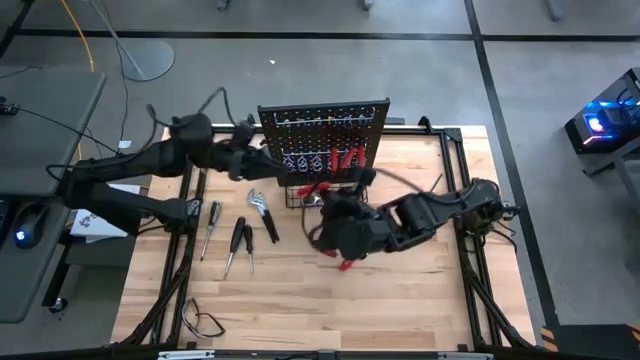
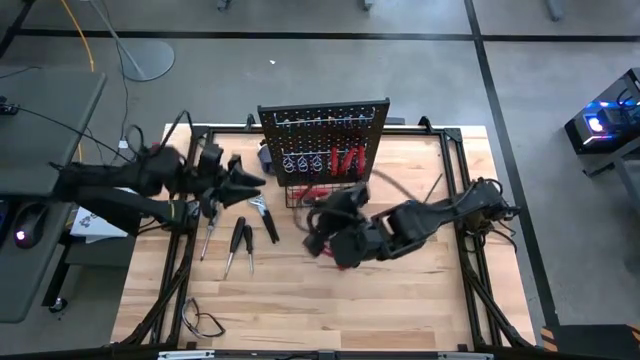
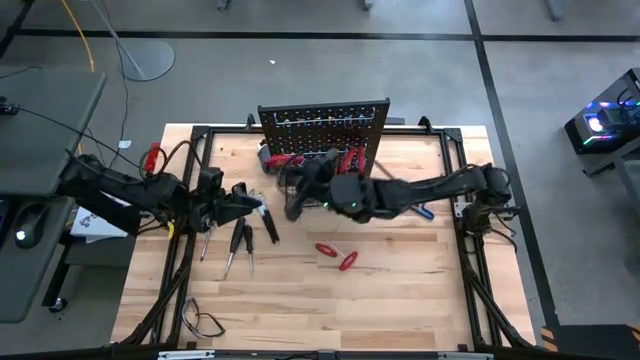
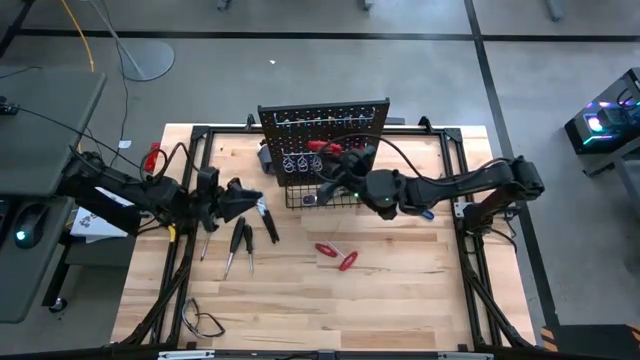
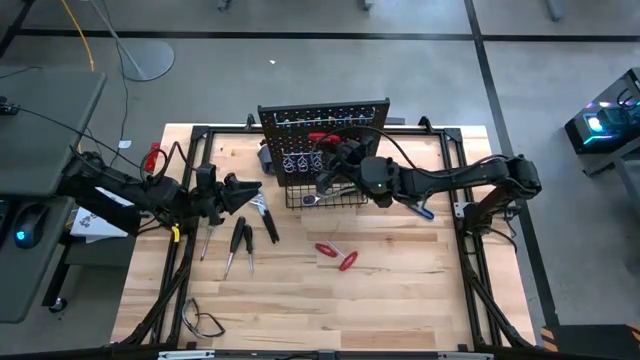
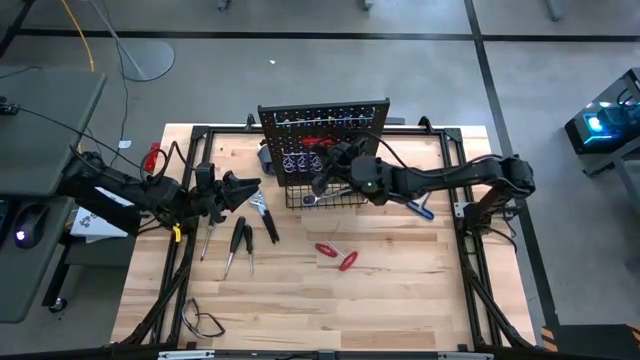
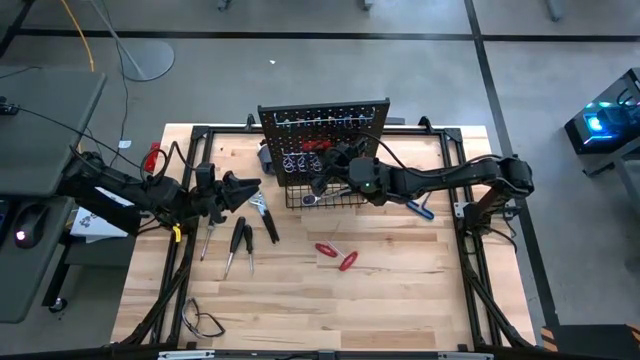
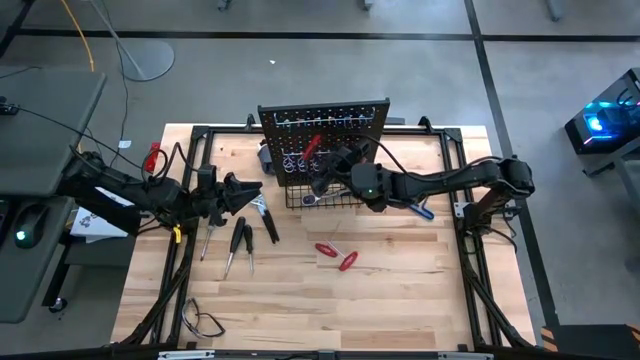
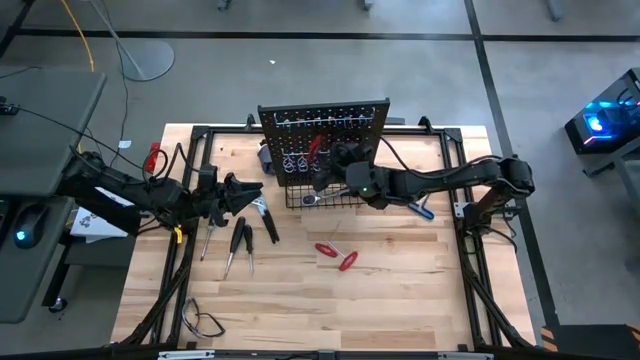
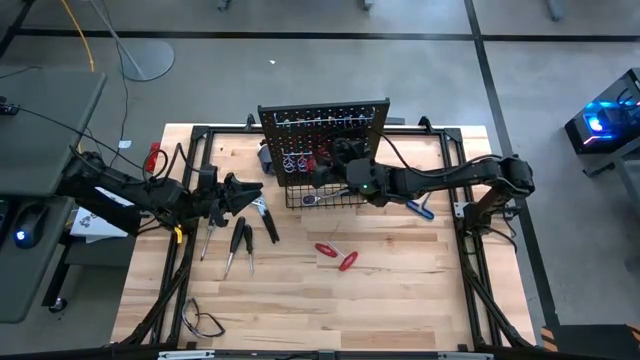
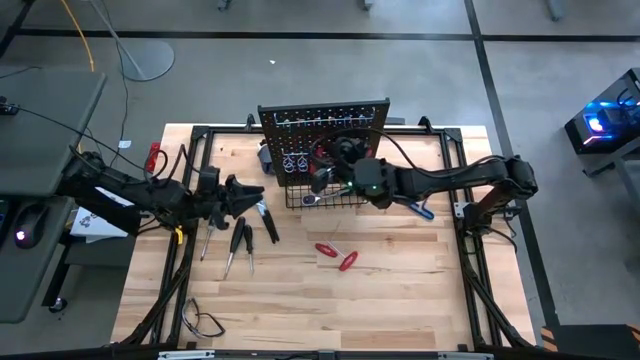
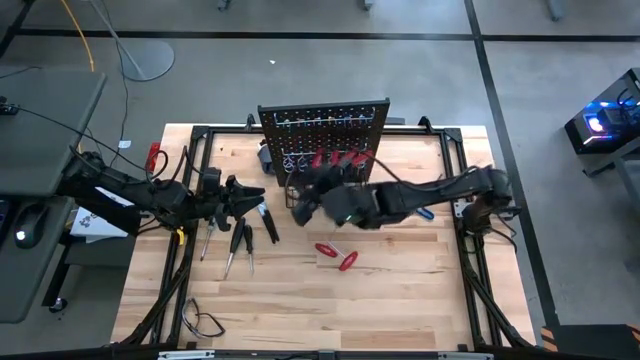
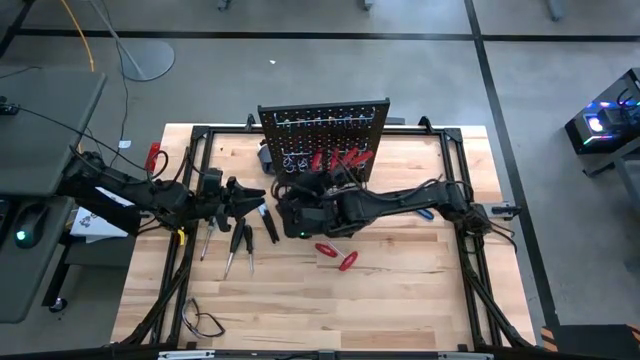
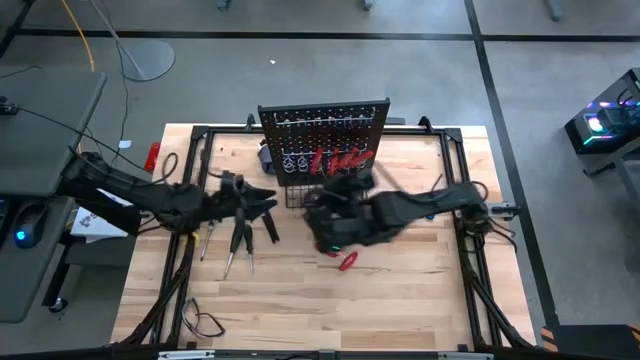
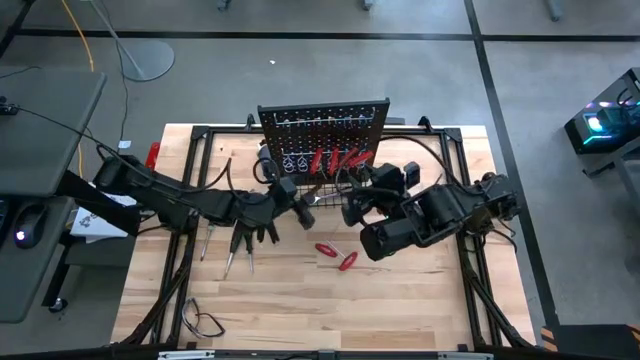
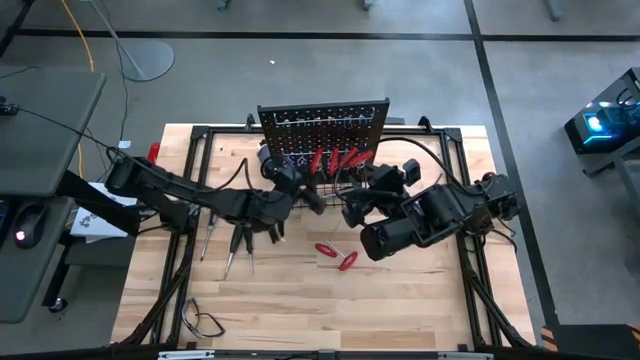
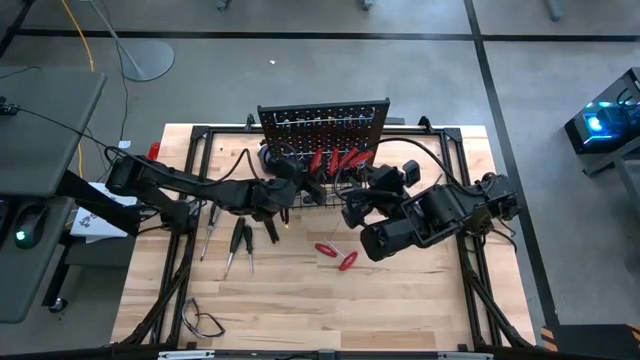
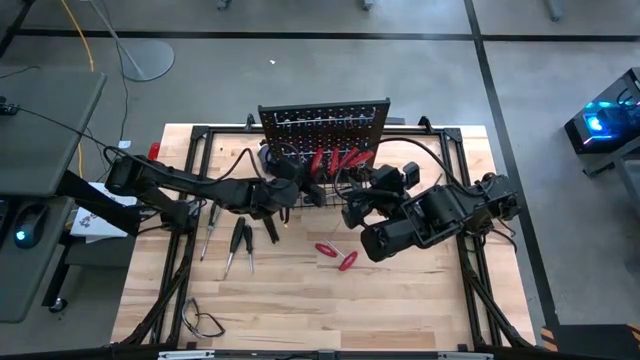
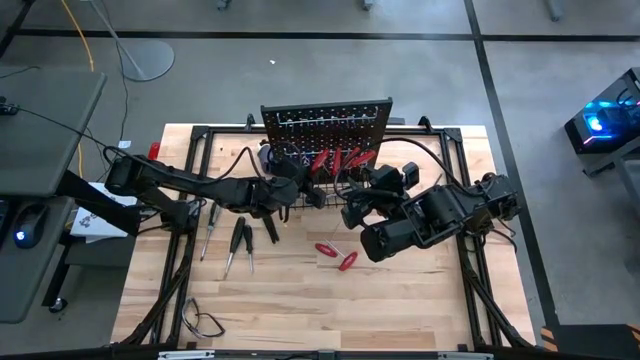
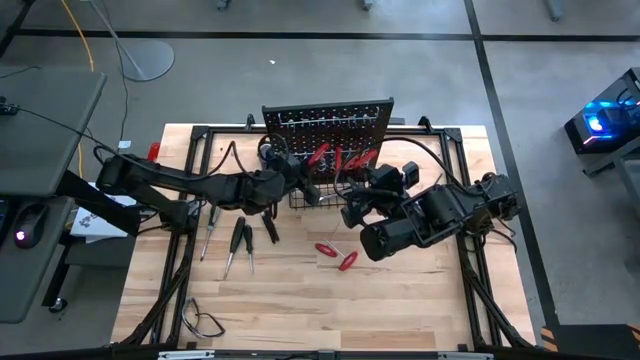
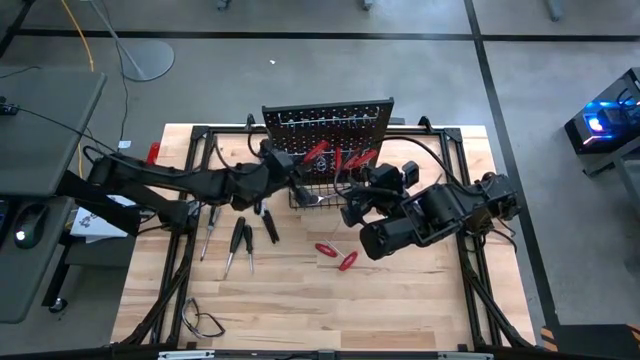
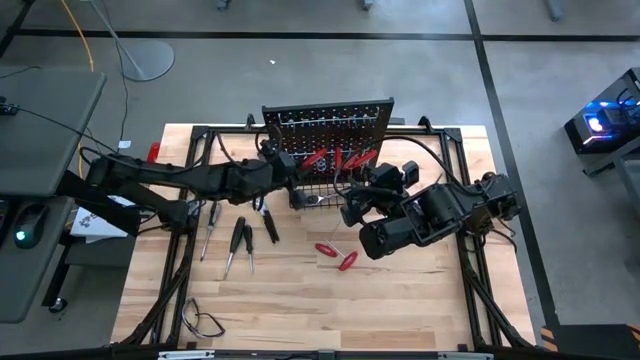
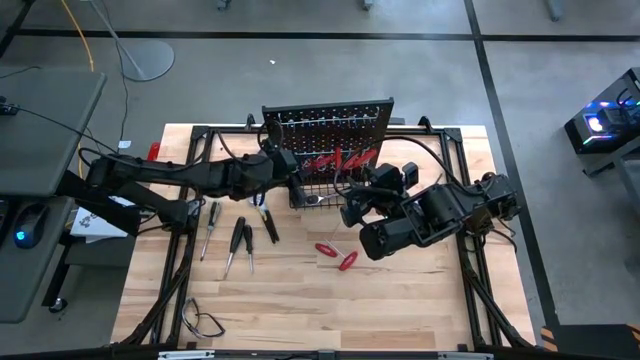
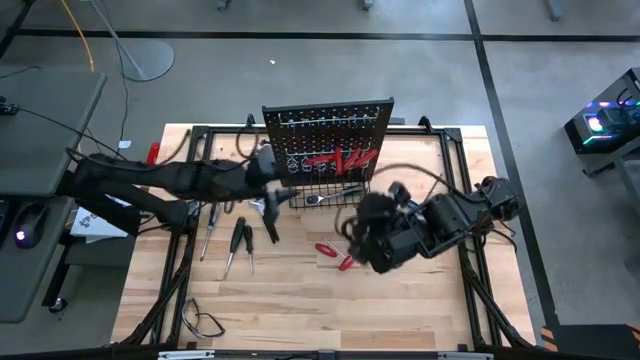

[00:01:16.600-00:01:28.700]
Task: Hang tools onto peg board
Hang the red allen wrench on the peg board

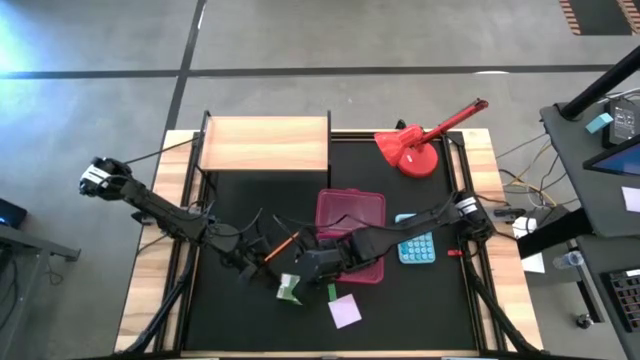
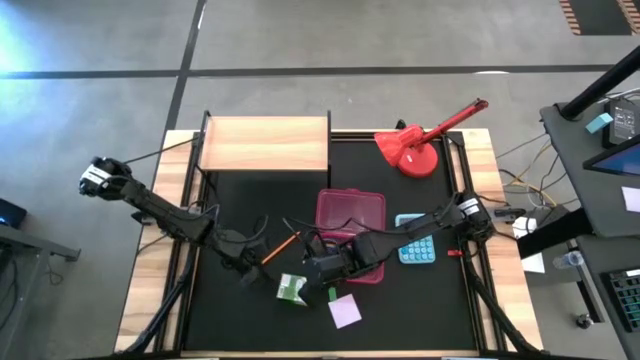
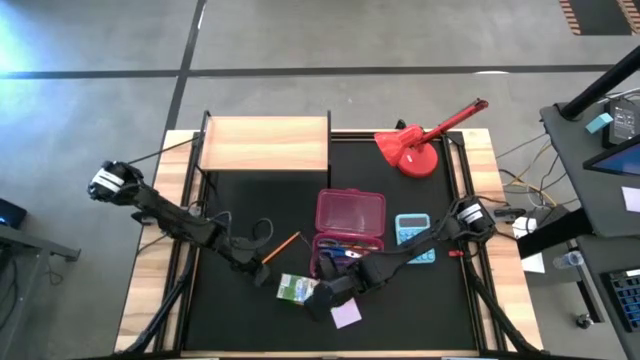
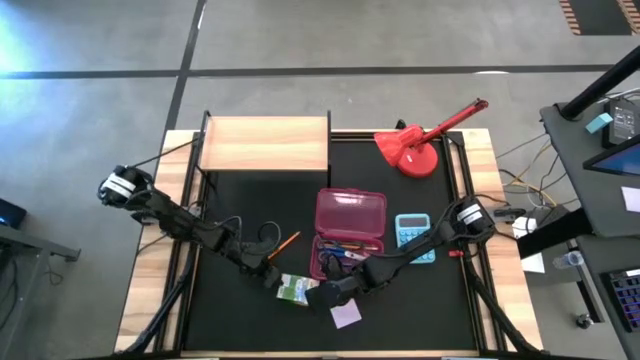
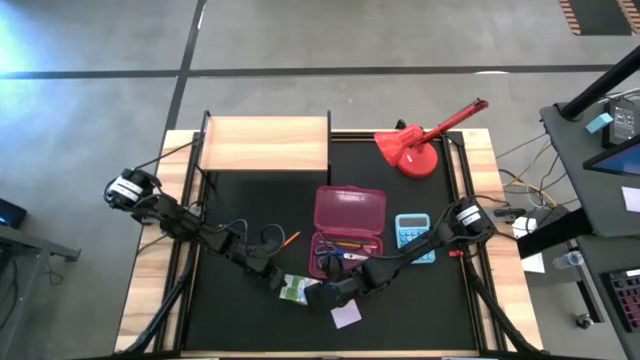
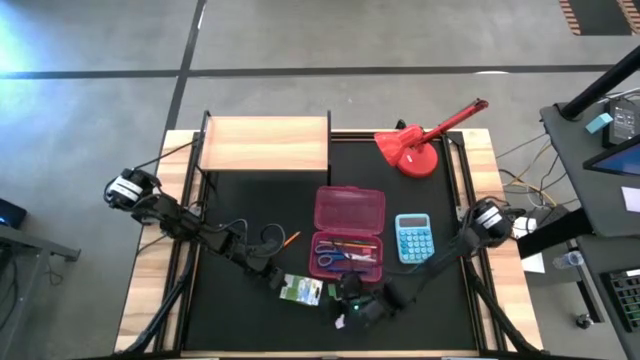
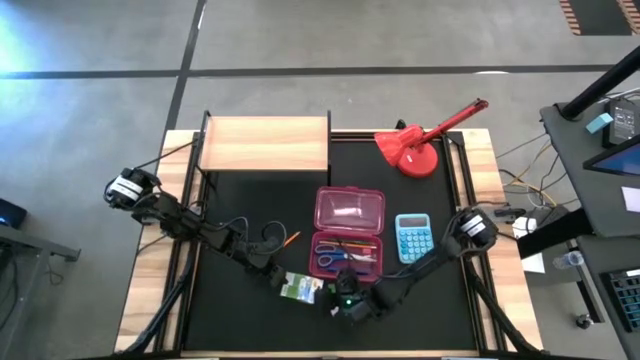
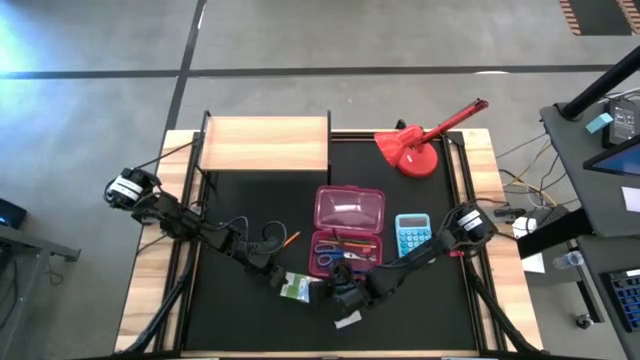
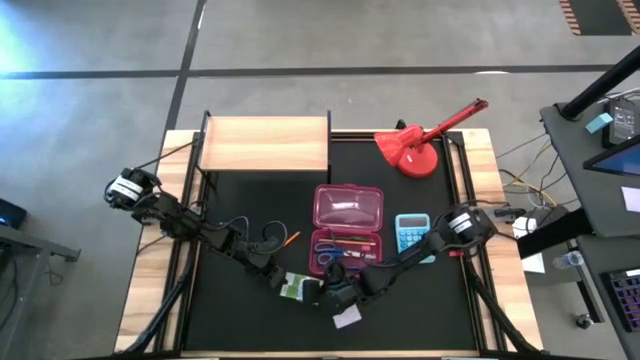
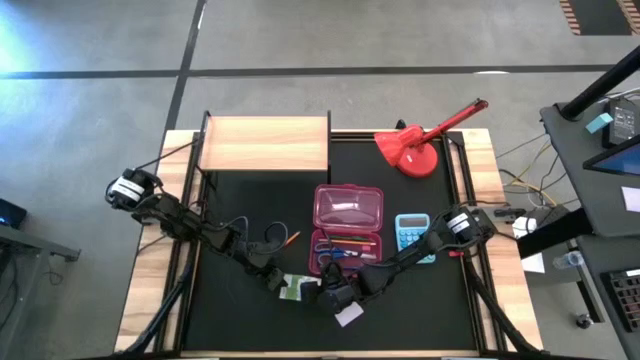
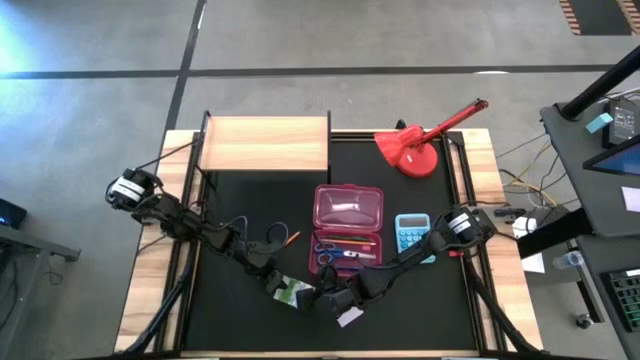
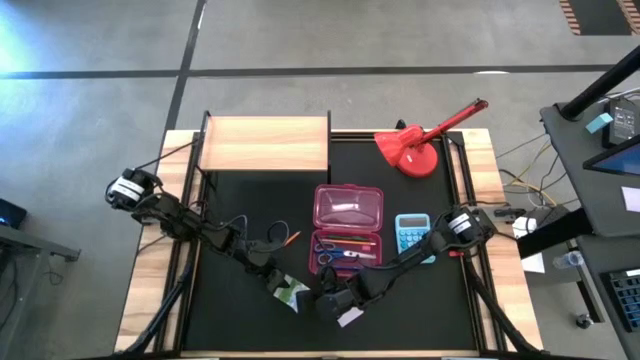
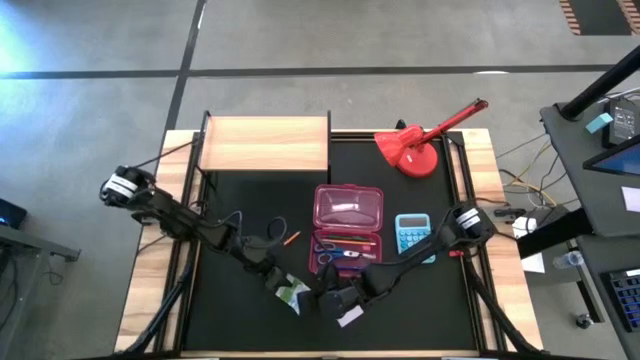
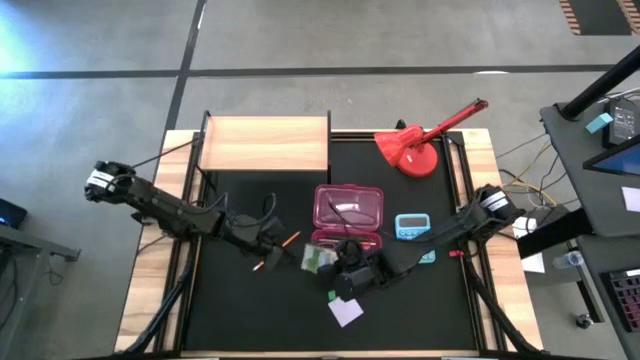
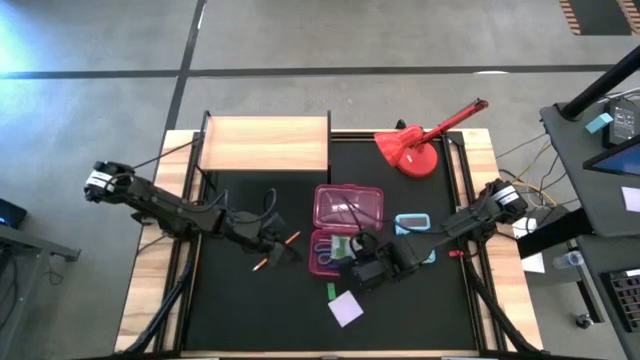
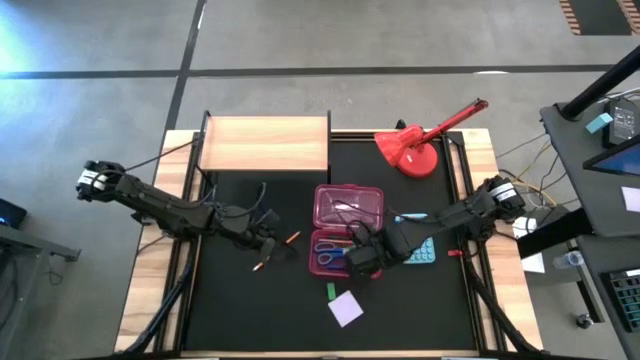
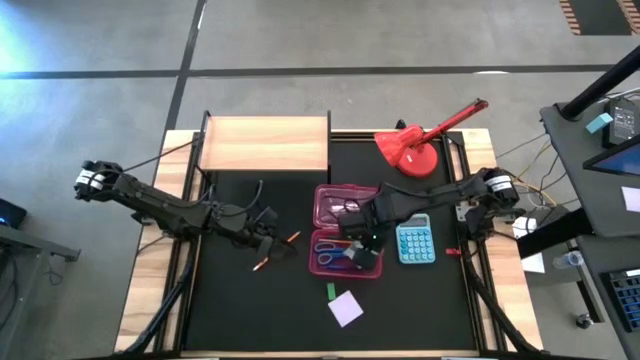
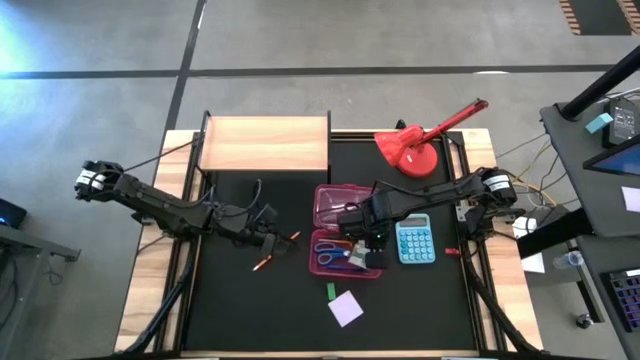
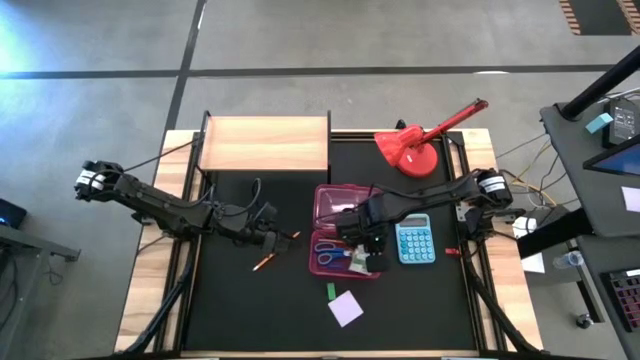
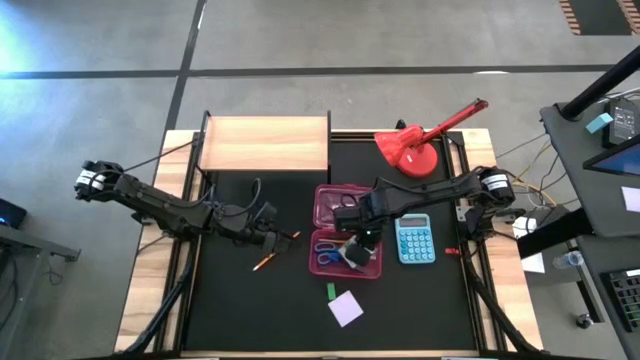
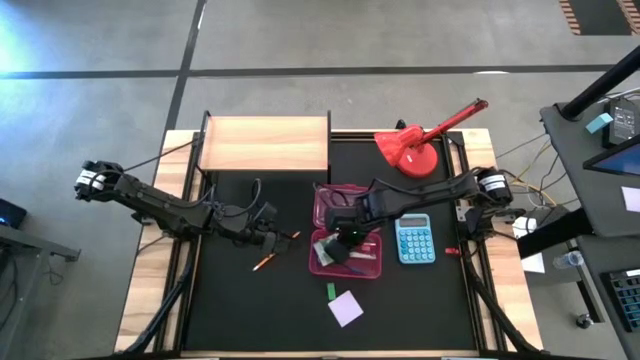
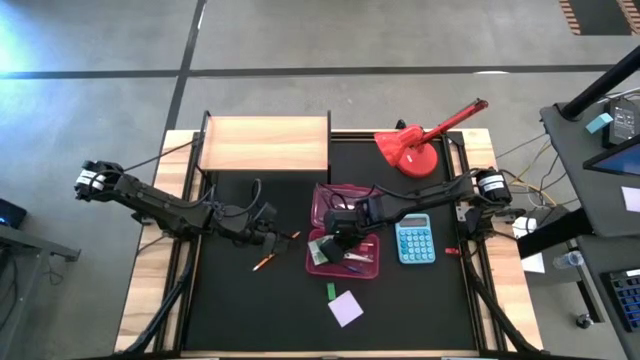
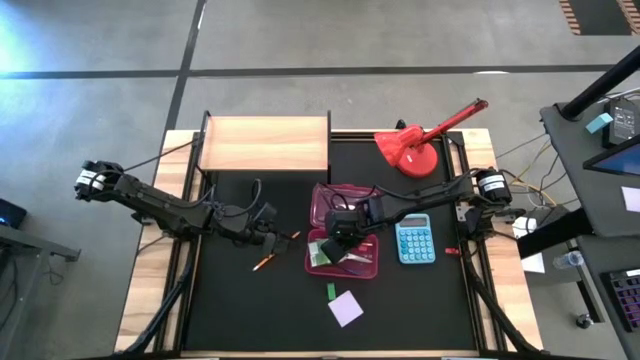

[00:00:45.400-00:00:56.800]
Task: Pack school essentials
Put the green box of crayons into the pink supply box
